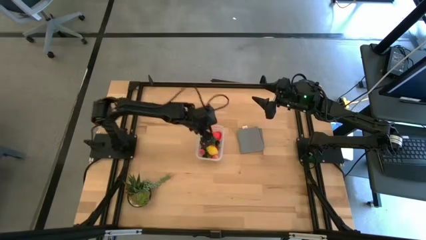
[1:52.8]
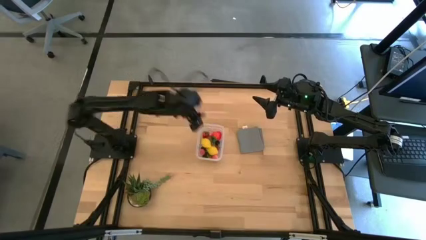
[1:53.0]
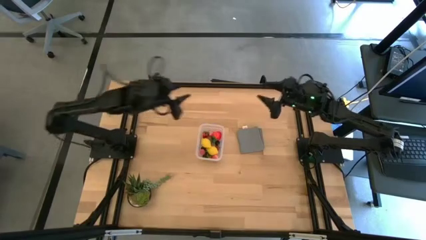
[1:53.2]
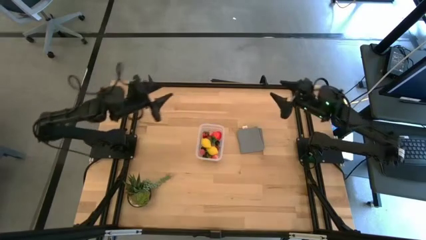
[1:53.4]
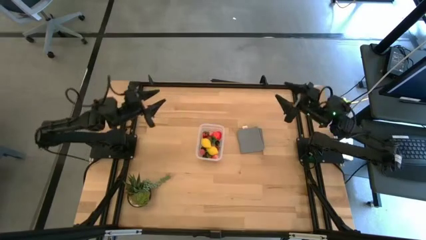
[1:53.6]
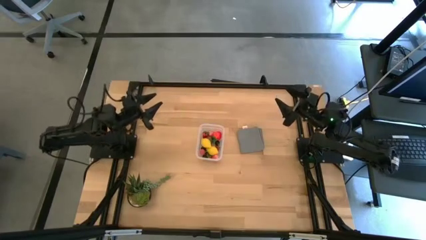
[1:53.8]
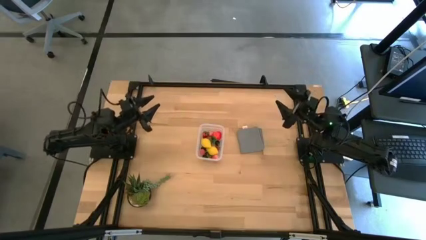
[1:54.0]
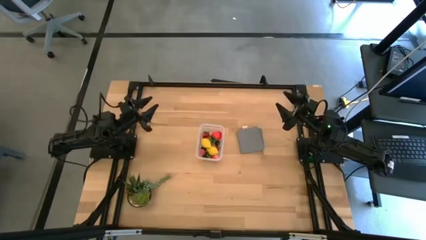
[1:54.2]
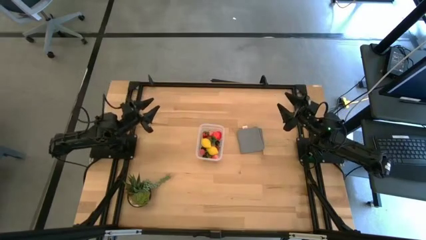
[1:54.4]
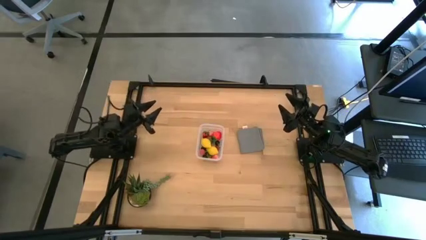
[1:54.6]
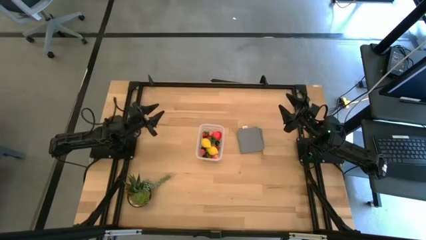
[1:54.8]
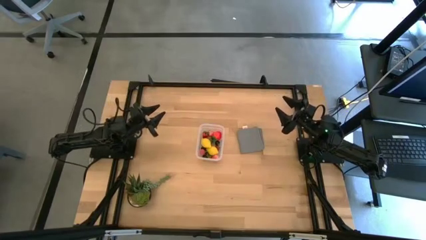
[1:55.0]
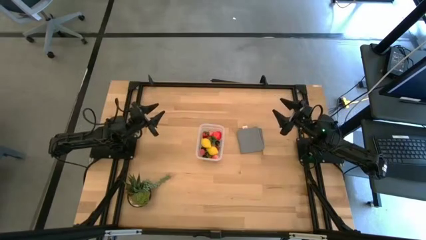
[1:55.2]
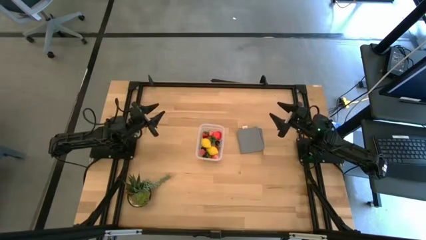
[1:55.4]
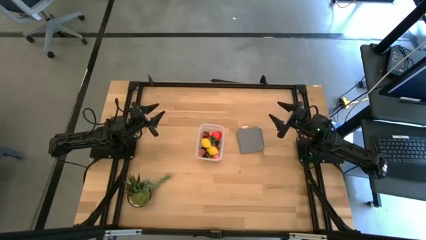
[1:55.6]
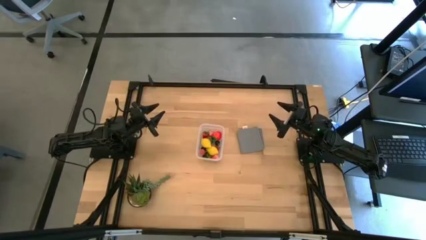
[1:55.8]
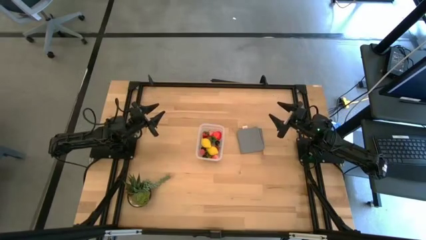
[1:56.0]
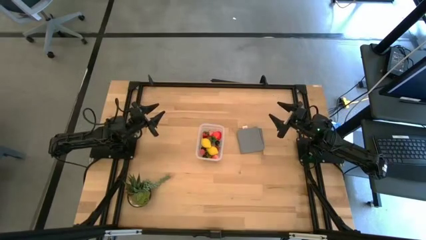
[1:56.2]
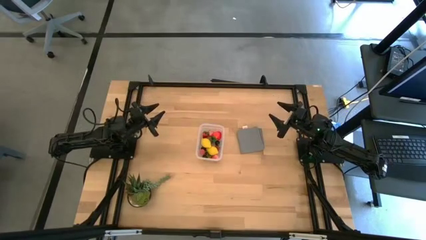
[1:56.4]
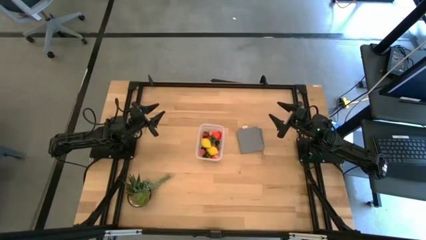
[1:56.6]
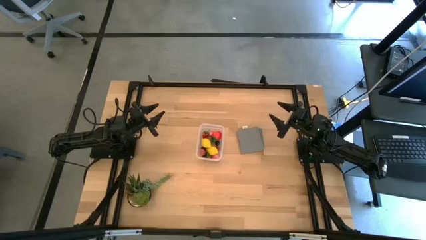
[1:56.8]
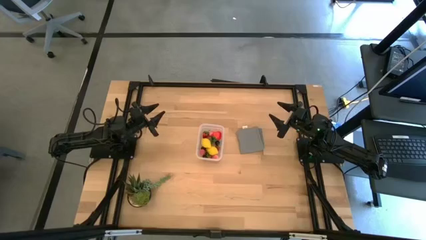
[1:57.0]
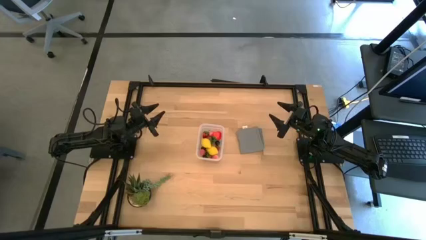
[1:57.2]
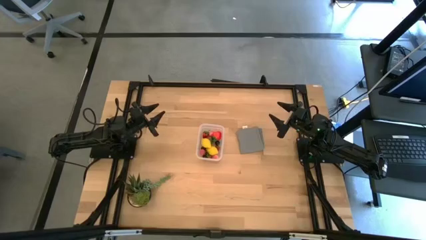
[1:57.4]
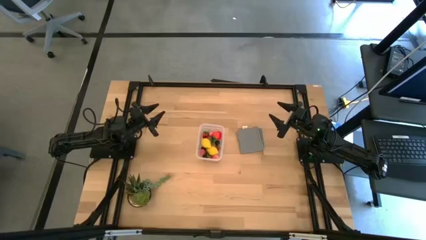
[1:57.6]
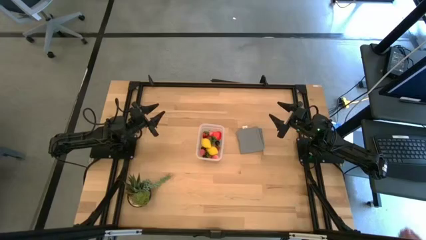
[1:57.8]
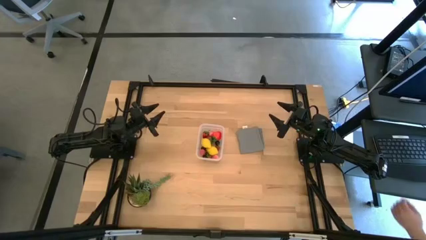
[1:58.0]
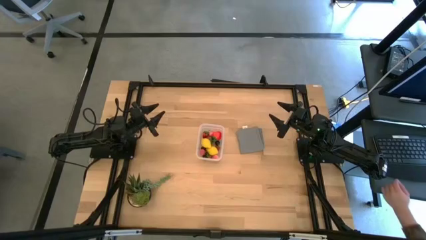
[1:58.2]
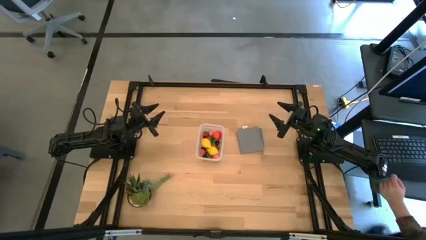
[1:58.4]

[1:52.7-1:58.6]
Task: Pick and placing Produce into tupperware
Return to Home Position

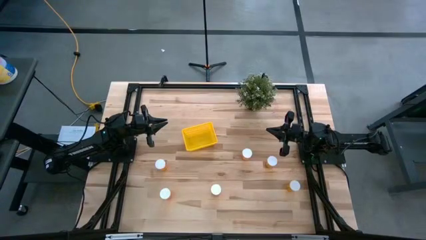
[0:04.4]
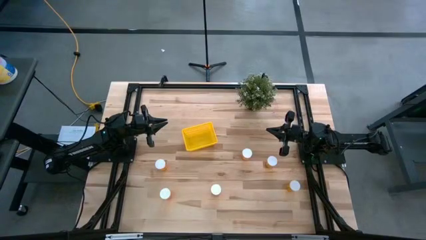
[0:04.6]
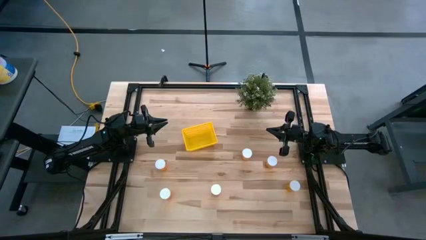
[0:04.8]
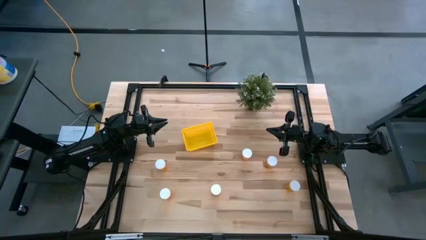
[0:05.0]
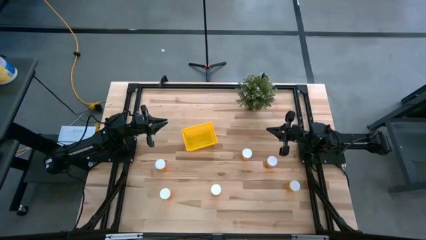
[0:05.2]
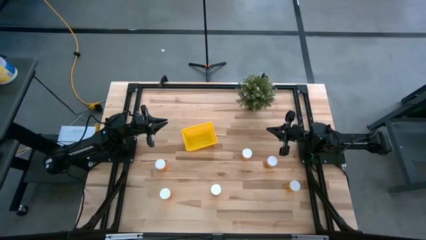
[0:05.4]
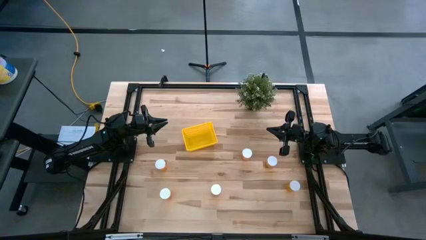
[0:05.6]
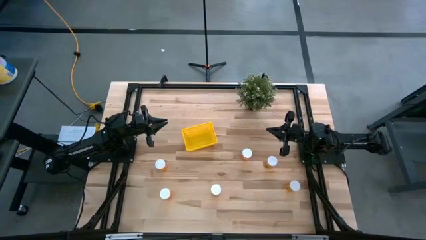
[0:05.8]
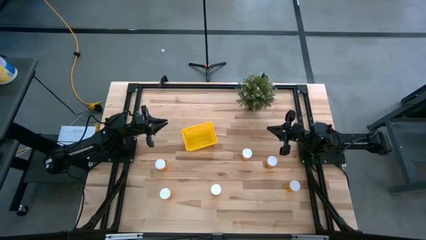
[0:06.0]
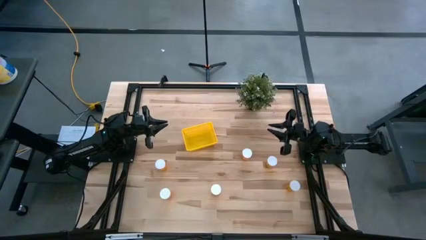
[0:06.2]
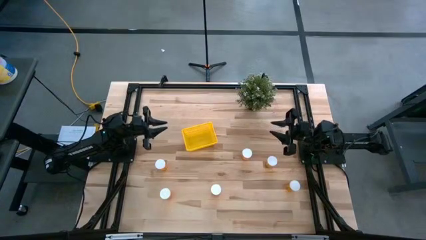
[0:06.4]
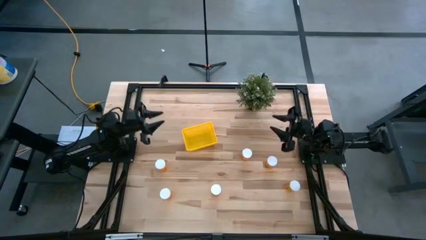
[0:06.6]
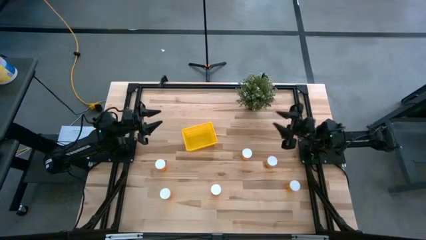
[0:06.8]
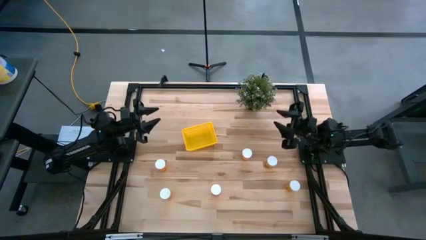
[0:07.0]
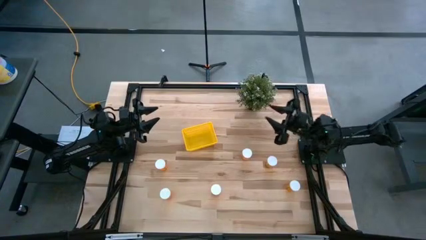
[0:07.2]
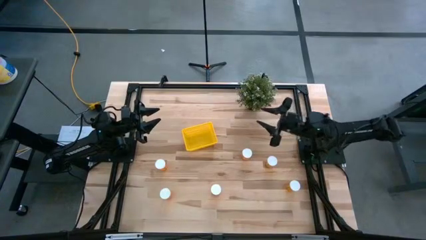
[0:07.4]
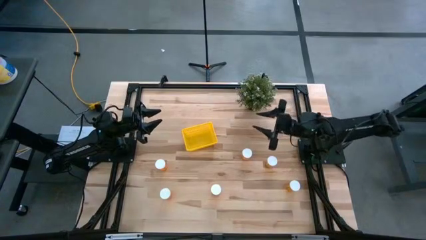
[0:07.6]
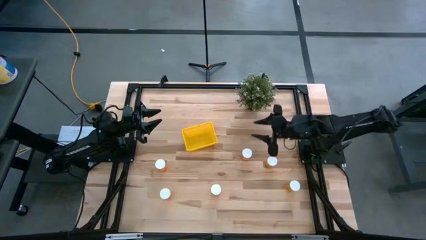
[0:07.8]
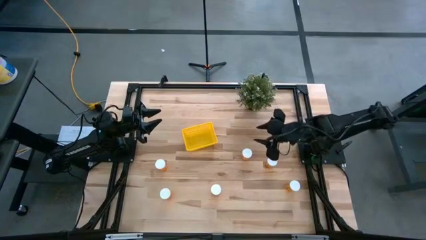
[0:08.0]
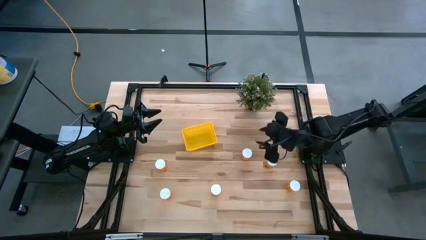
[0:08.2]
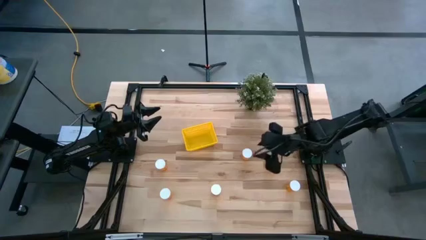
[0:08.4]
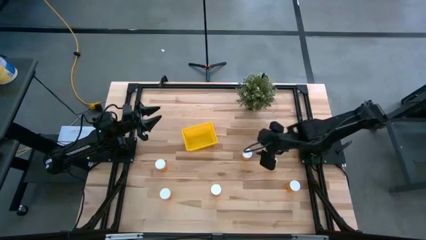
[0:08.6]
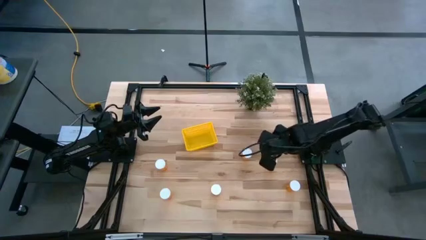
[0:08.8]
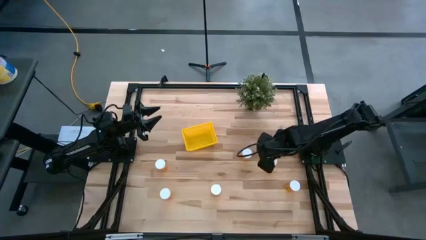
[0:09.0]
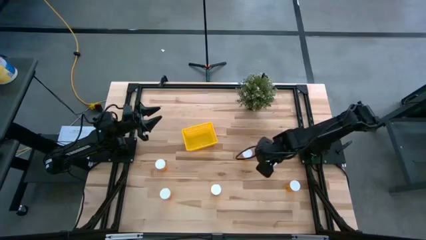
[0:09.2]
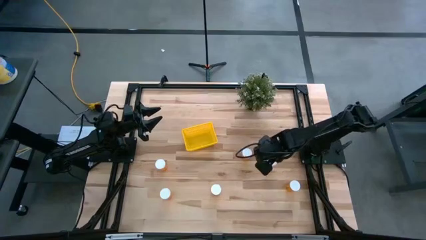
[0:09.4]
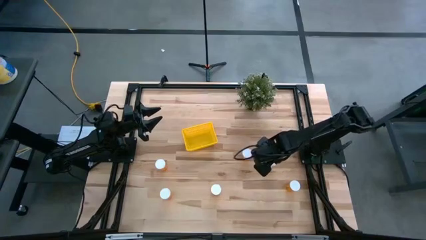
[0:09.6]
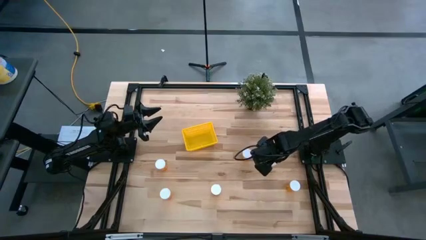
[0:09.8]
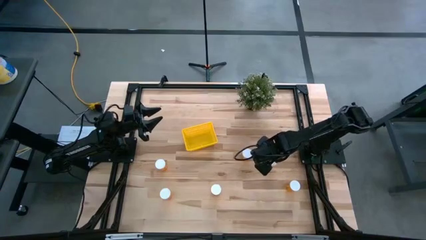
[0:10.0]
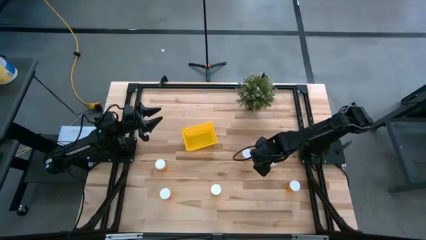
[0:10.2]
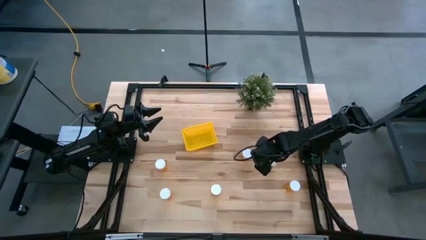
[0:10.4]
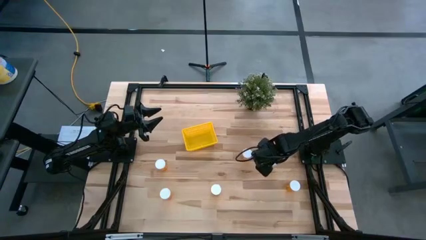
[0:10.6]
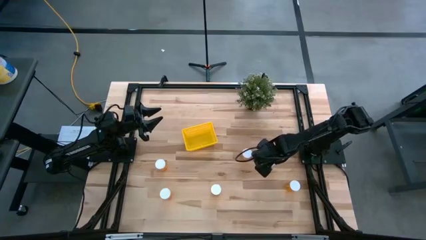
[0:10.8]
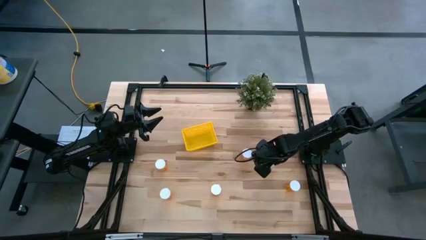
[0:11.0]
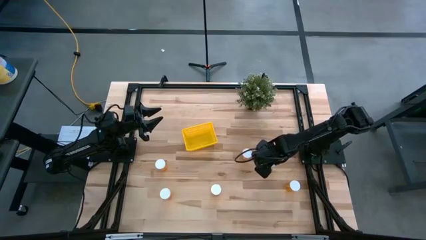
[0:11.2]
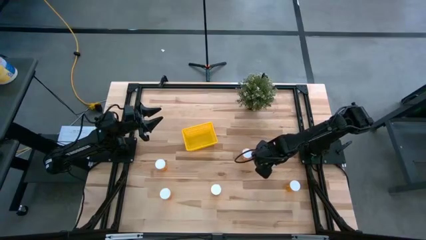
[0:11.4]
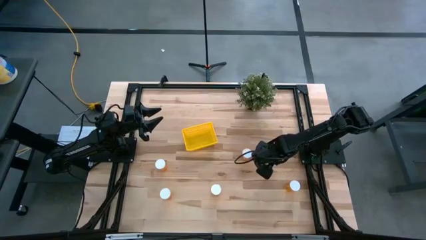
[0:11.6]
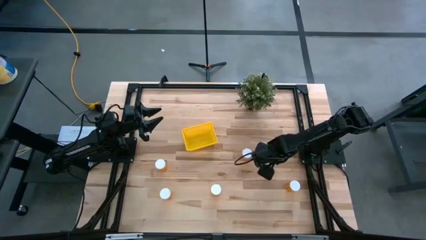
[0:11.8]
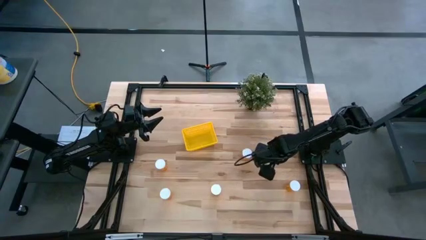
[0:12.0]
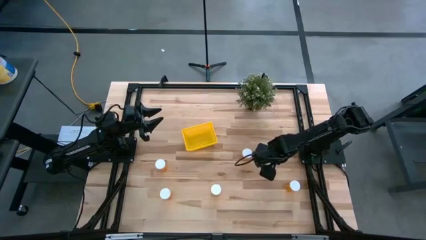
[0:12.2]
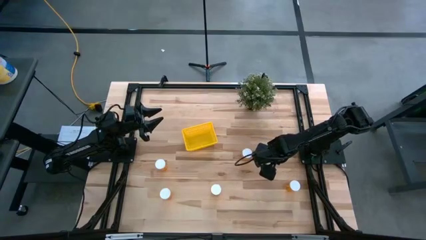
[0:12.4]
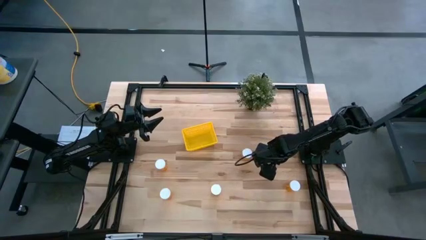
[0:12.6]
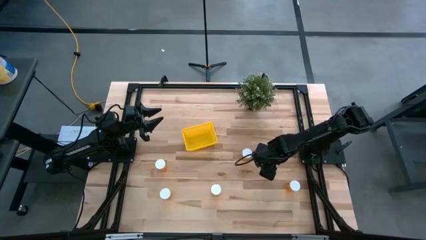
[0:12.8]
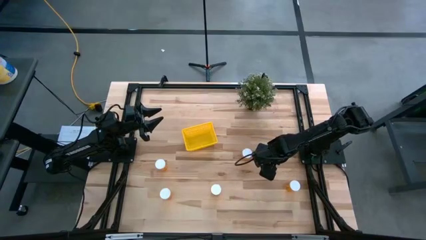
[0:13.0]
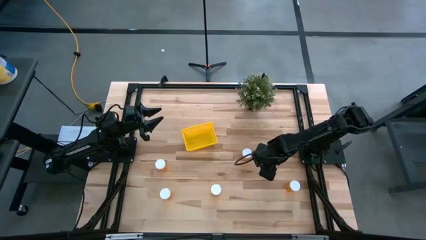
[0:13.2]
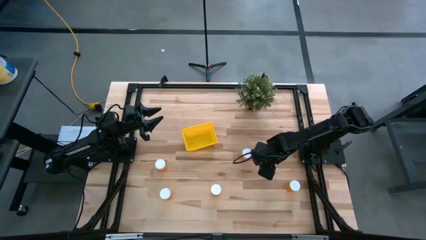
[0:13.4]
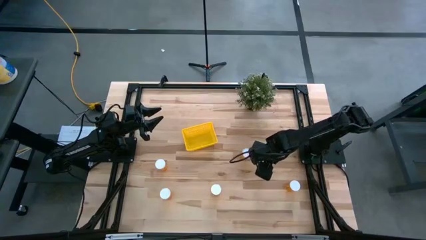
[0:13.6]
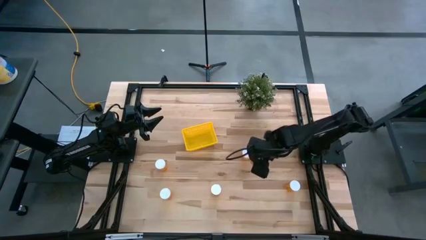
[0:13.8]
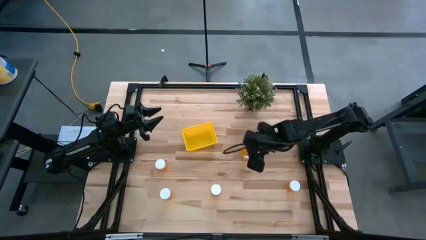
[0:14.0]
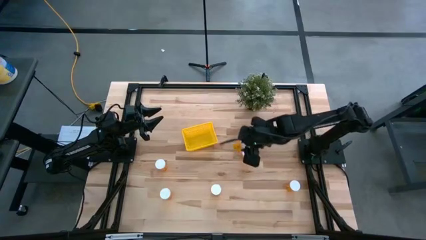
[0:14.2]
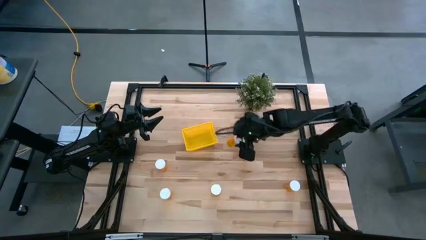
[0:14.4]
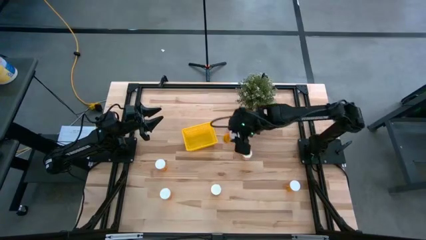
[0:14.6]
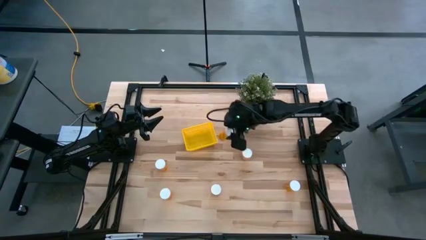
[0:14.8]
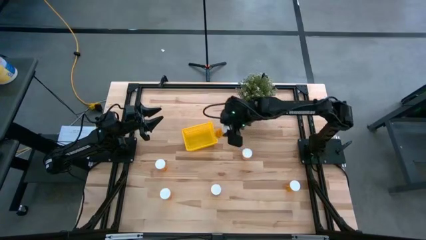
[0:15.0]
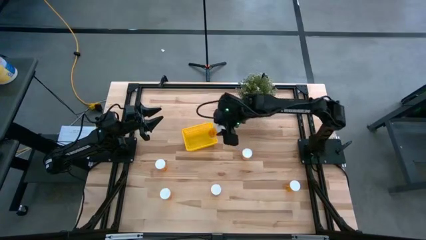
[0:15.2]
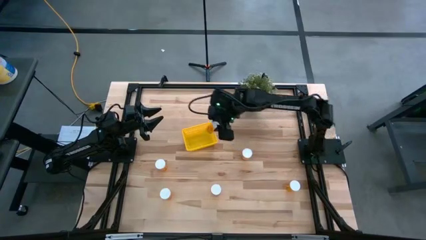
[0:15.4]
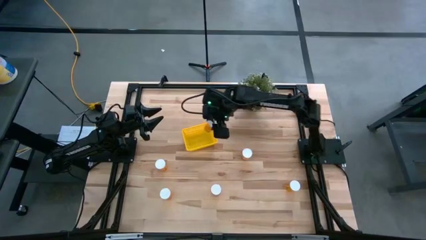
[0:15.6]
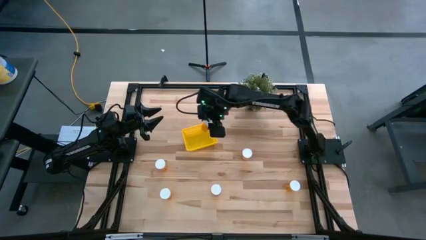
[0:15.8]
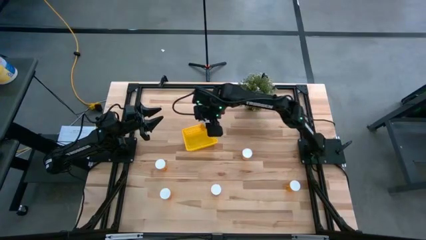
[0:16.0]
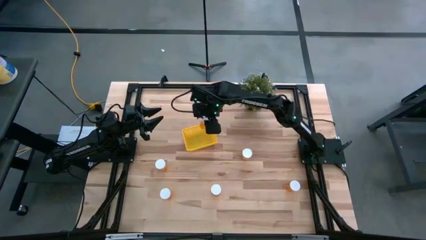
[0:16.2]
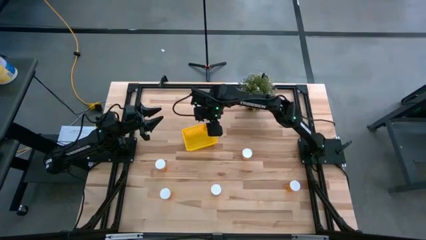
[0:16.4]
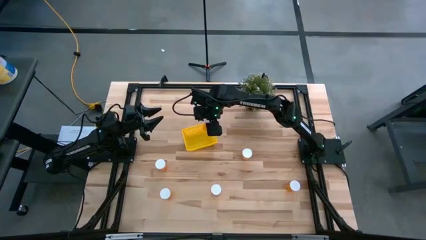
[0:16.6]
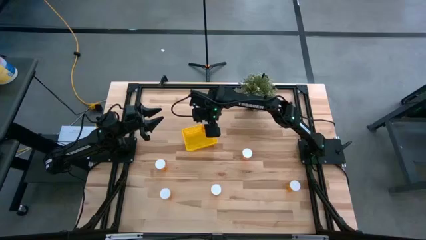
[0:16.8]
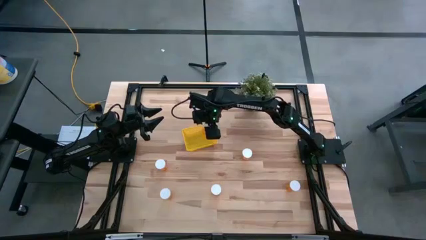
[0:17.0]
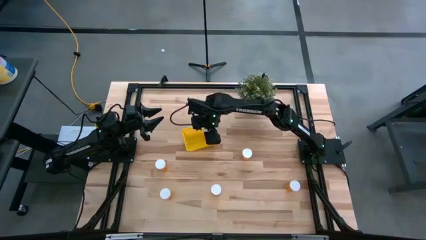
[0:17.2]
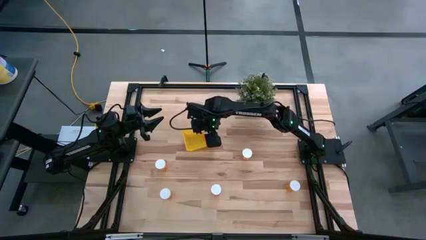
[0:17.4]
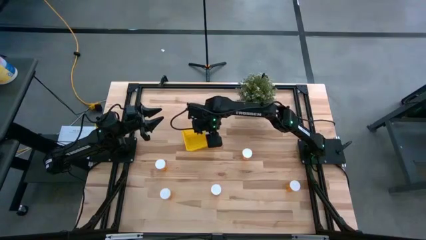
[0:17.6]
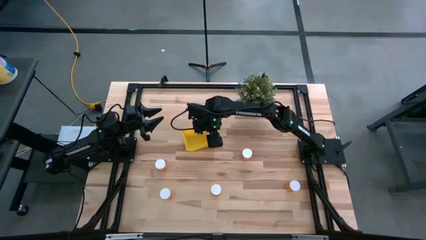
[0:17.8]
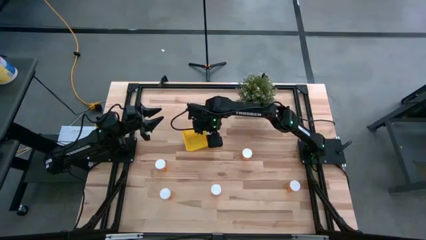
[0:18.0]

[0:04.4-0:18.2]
Task: Pick and place pill bottles into a basket
Put the orange pill bottle into the yellow bin
